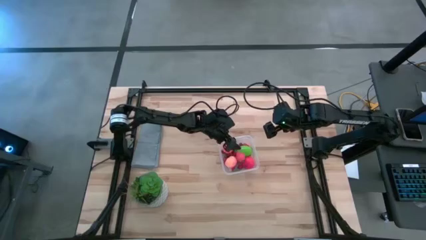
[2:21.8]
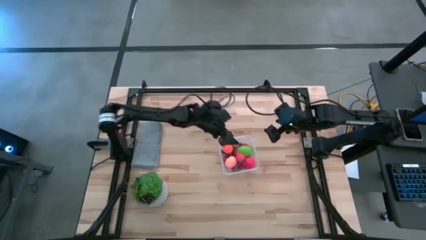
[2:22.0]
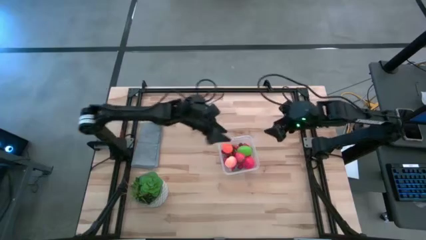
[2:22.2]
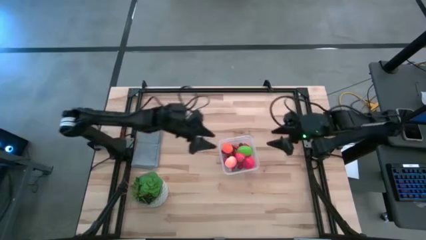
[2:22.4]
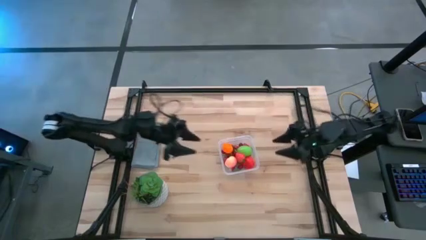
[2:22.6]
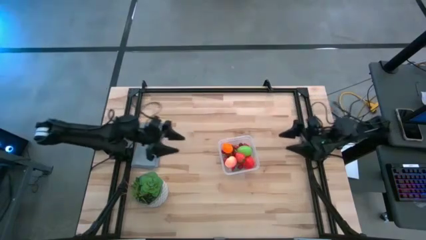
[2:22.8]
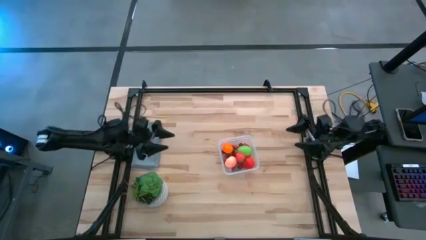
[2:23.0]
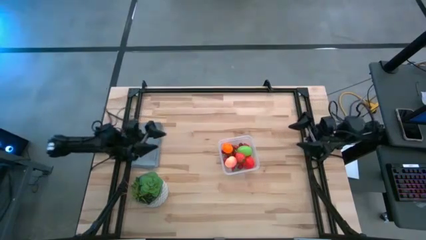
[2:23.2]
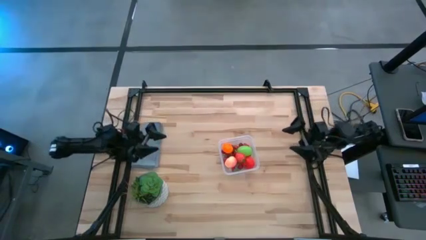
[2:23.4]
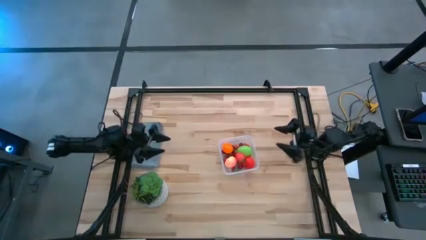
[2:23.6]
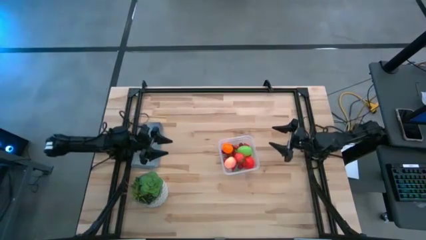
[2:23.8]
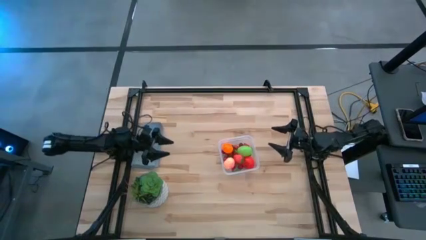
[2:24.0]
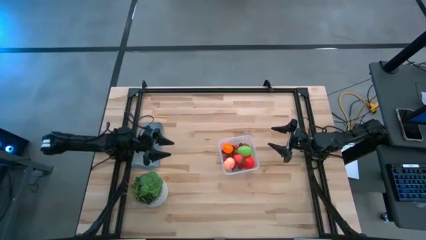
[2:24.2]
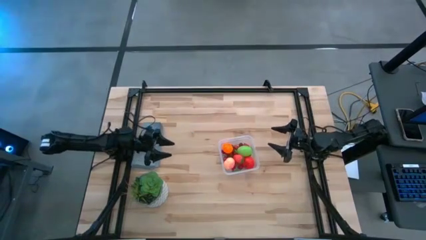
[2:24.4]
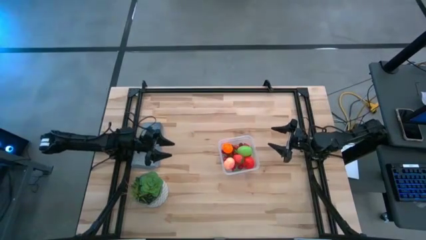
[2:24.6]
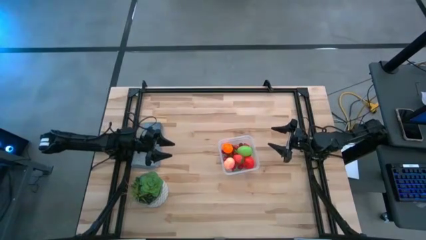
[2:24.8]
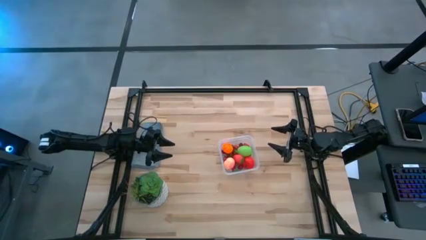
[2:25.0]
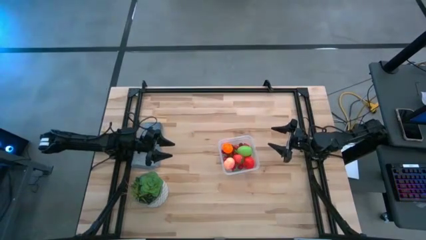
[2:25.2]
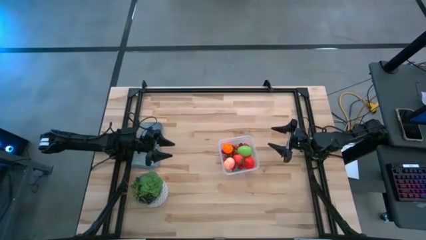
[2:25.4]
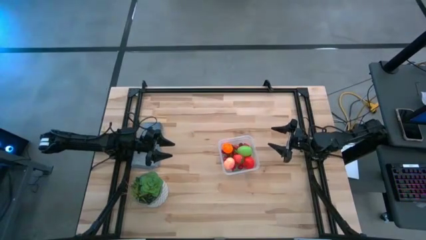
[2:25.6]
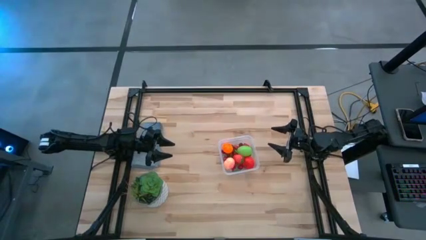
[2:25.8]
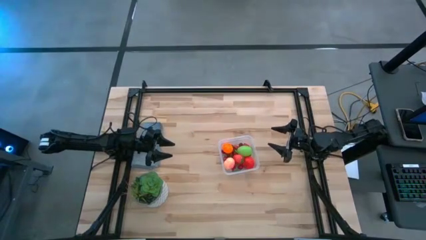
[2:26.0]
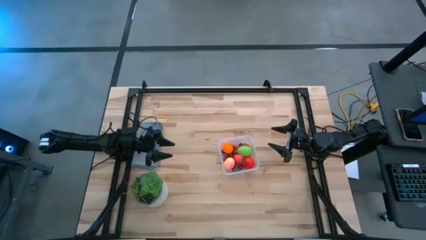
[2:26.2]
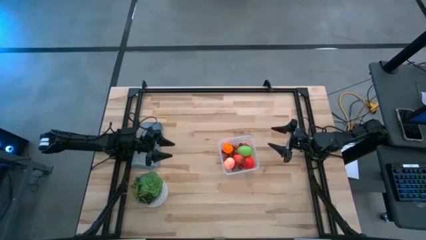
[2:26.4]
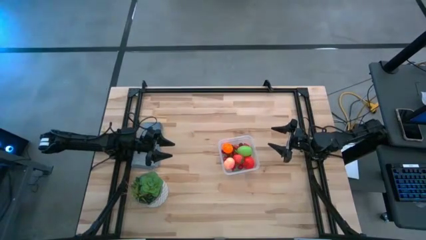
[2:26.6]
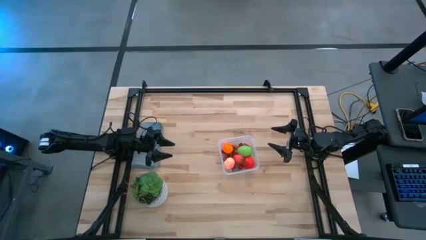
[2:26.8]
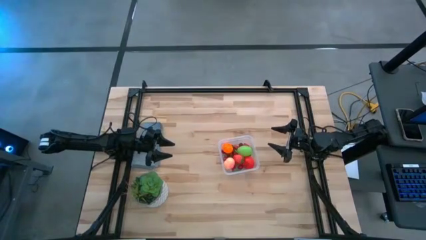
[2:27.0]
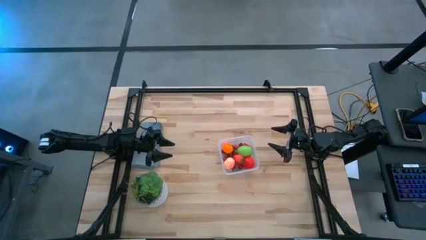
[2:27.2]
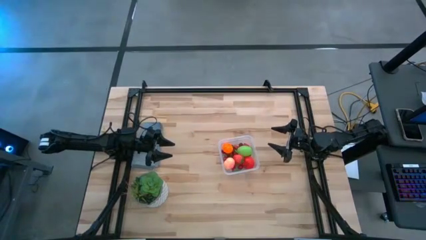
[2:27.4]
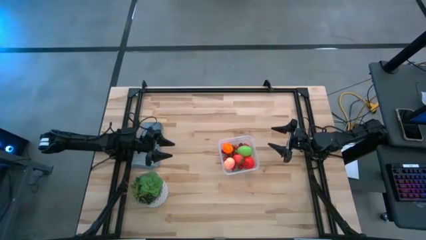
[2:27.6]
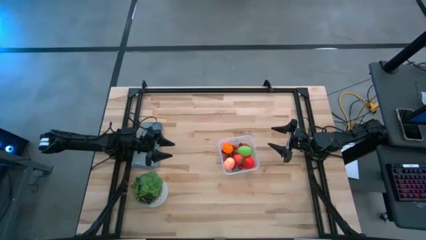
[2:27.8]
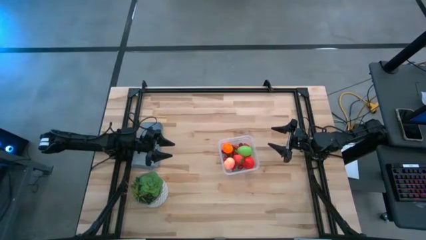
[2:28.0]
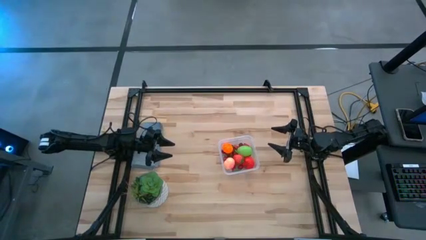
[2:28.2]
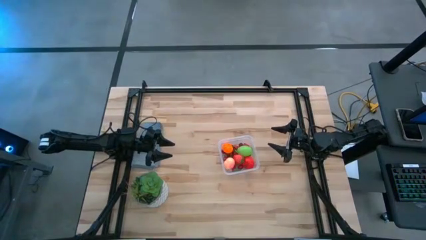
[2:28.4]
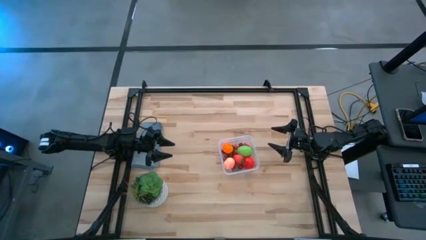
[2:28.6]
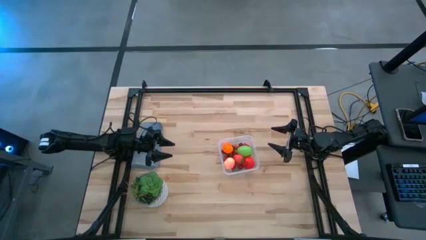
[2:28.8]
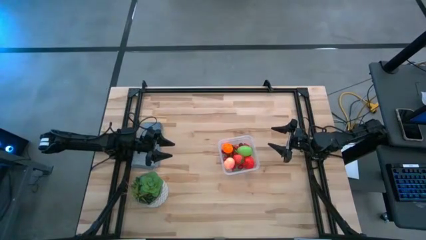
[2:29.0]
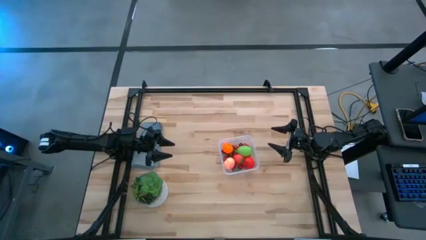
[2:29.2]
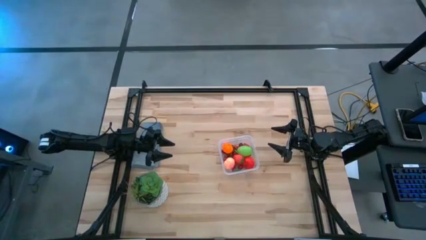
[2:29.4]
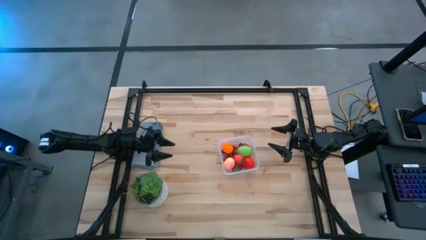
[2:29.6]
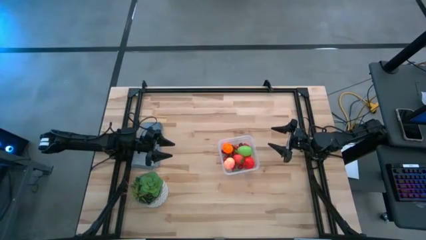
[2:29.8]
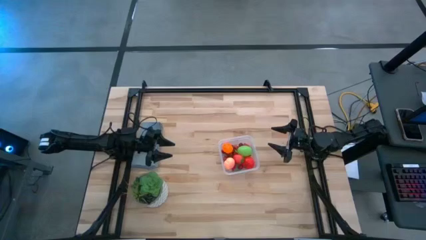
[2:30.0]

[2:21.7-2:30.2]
Task: Pick and placing Produce into tupperware
Return to Home Position

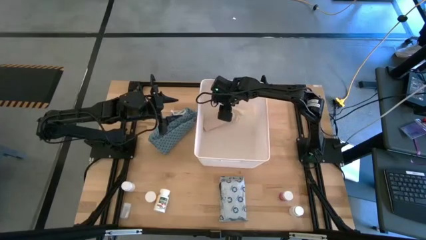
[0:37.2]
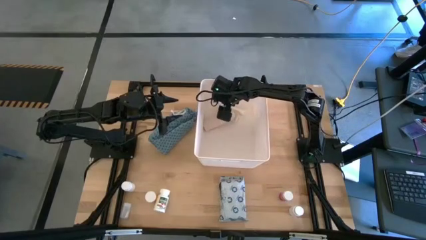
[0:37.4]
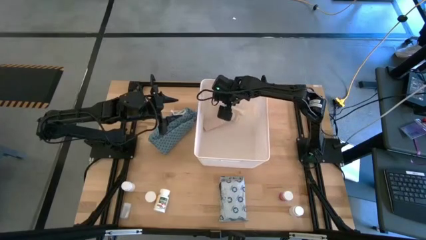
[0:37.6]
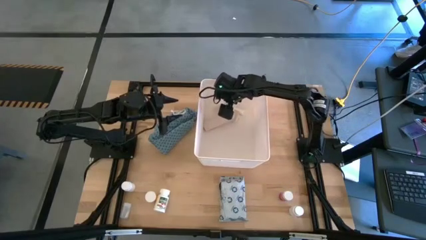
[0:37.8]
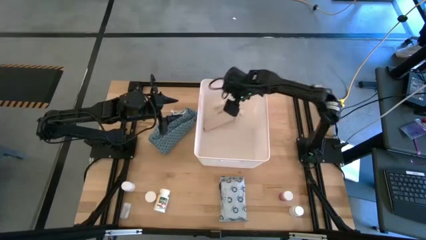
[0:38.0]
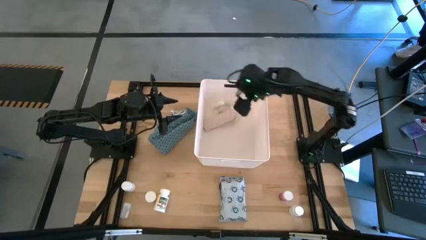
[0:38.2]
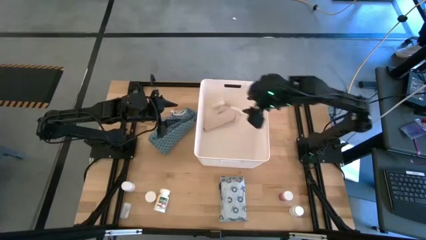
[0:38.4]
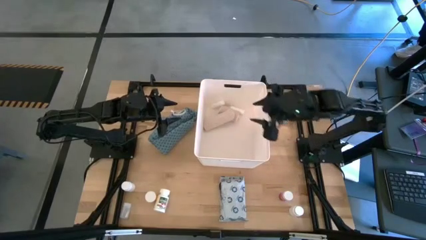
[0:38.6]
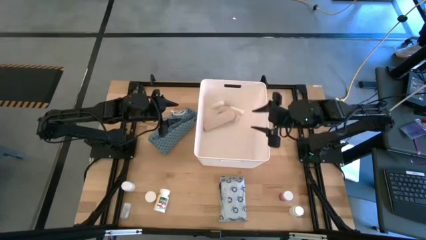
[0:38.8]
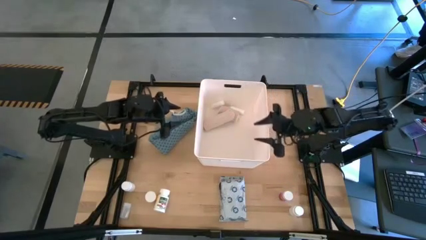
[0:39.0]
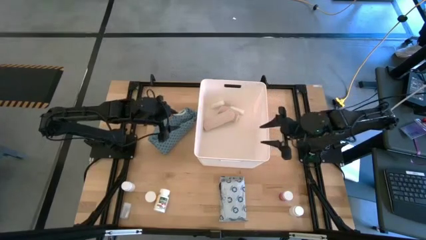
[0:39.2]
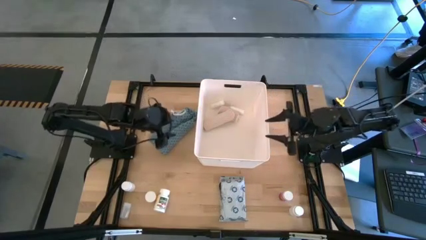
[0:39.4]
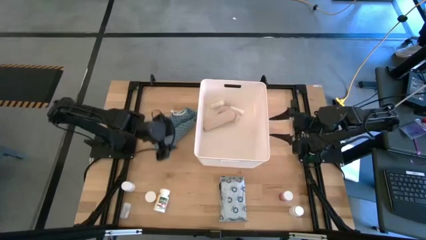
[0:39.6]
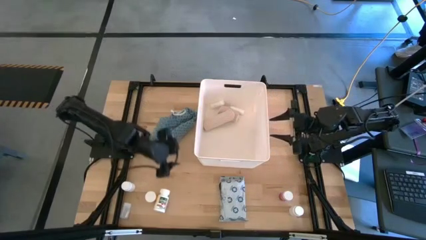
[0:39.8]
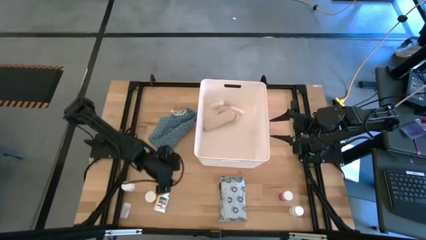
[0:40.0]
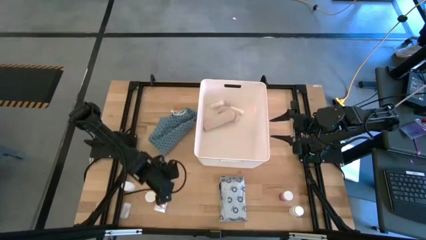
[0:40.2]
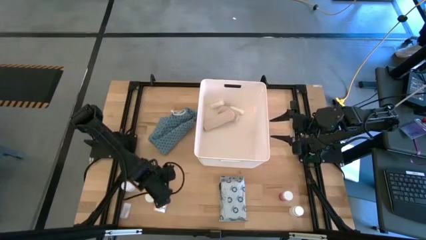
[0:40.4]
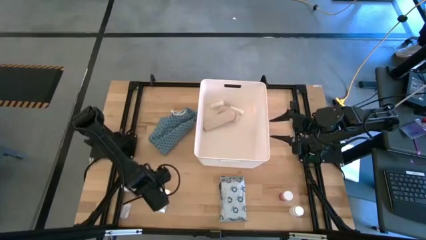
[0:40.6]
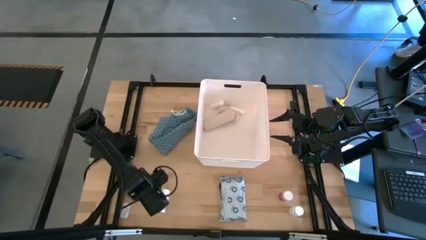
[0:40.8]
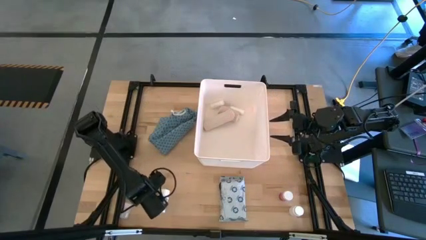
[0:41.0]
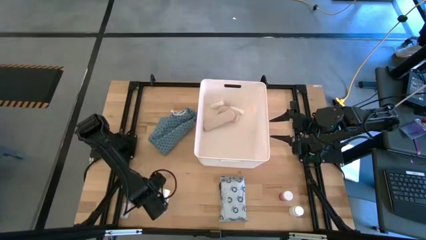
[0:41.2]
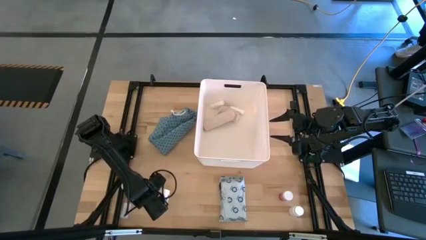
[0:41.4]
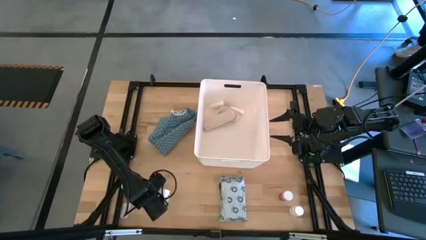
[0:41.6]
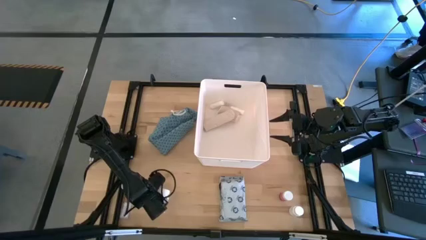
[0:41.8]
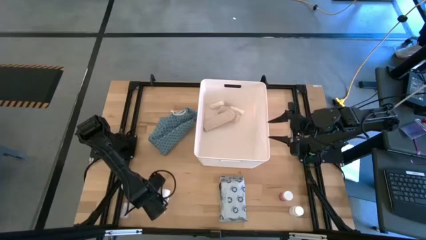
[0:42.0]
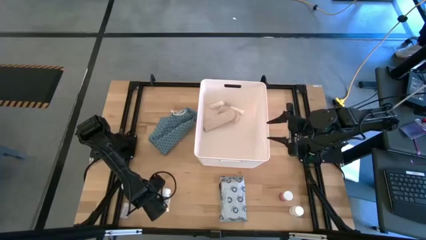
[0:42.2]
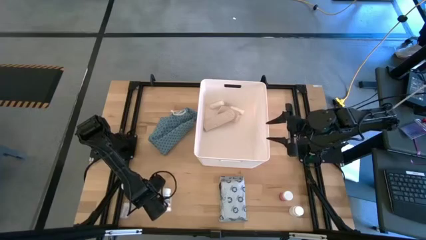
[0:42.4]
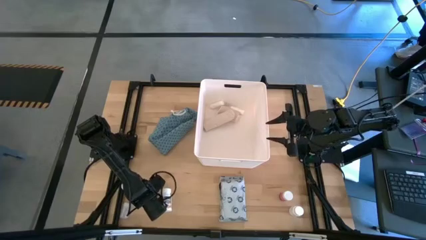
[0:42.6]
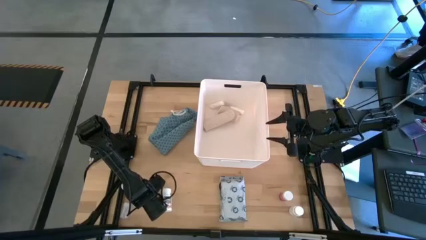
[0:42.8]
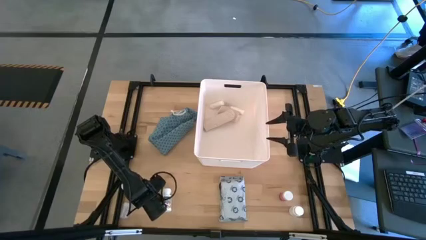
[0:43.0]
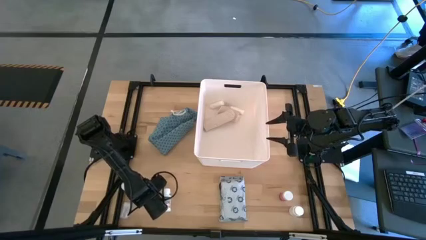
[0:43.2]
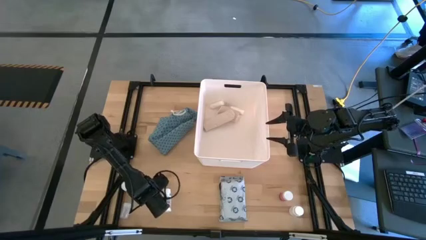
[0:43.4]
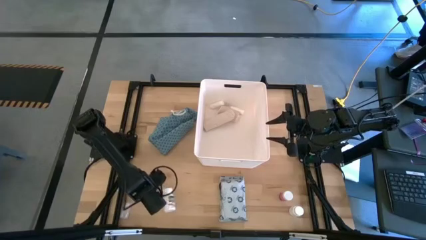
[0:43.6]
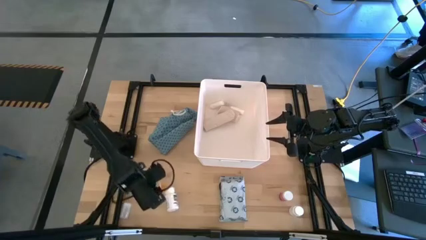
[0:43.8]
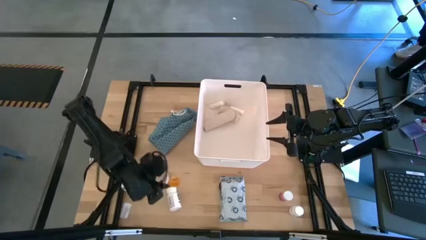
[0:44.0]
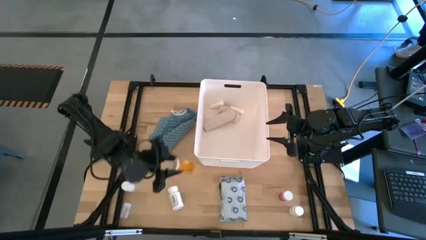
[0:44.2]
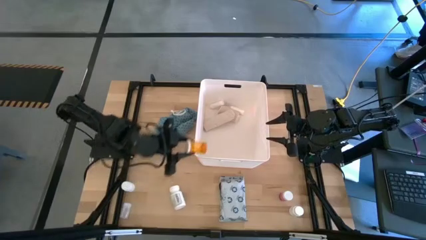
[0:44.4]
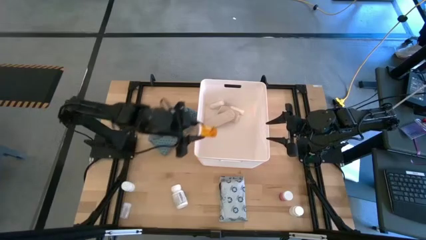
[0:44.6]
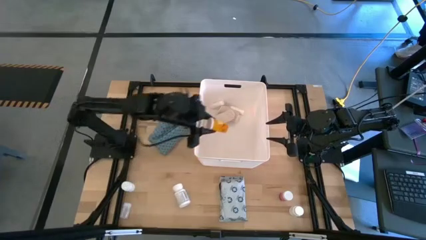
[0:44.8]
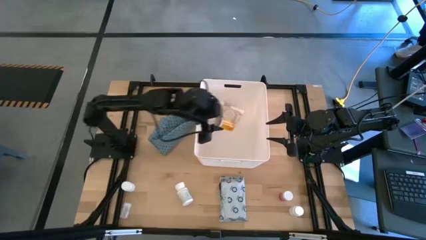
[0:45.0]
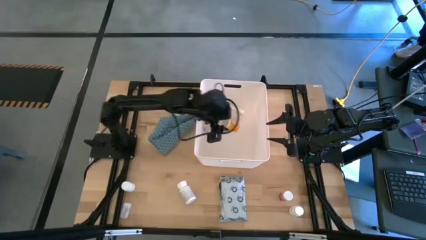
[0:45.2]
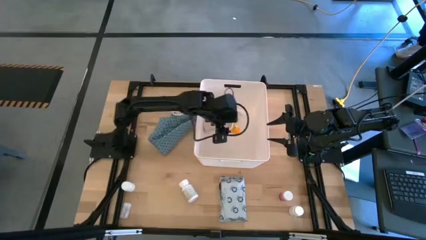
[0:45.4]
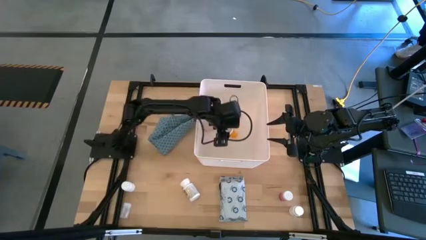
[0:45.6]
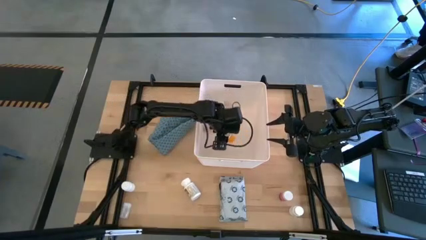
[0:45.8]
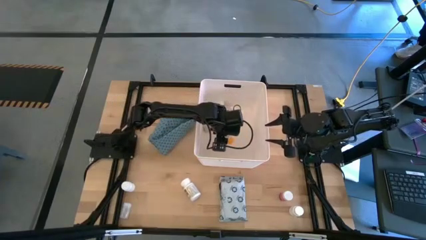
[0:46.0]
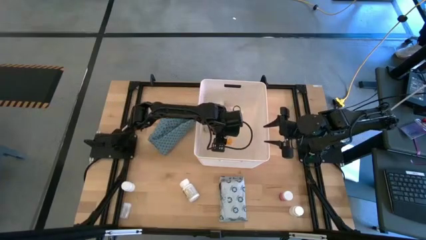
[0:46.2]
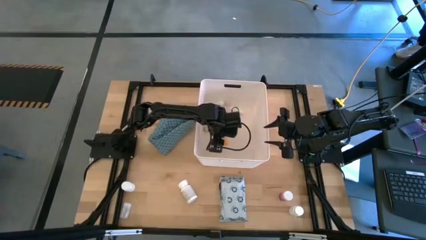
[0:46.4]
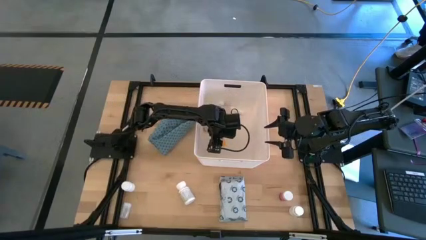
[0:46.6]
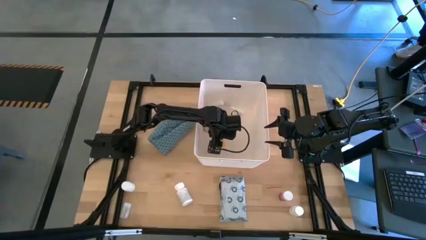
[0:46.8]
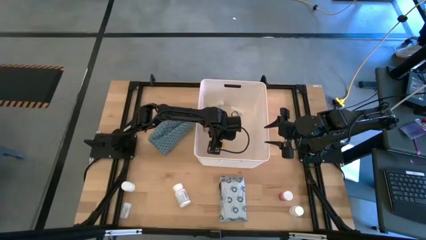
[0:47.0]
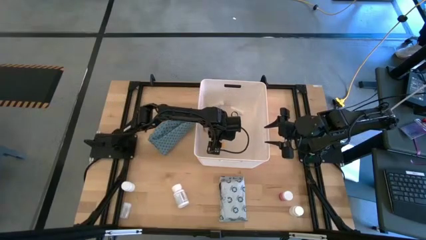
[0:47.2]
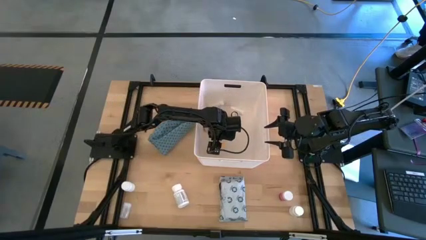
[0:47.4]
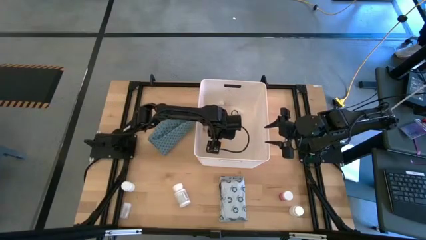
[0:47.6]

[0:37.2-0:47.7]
Task: Pick & place medical supplies in basket/bin
Put the orange medicine bottle into the white bin
